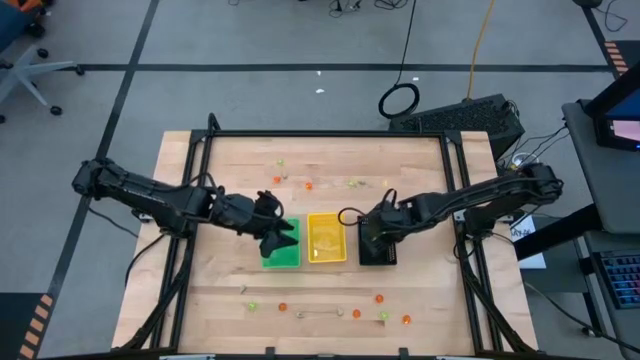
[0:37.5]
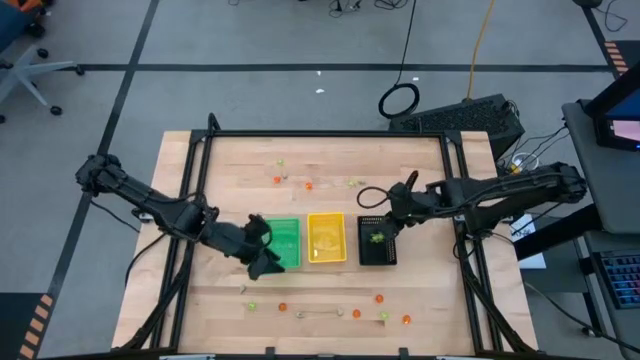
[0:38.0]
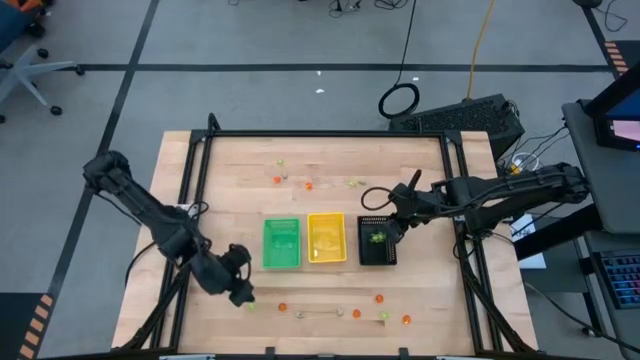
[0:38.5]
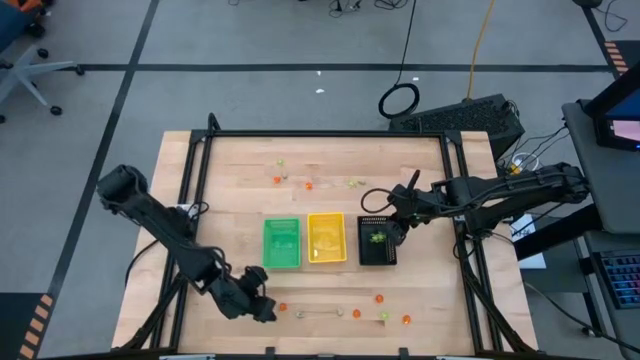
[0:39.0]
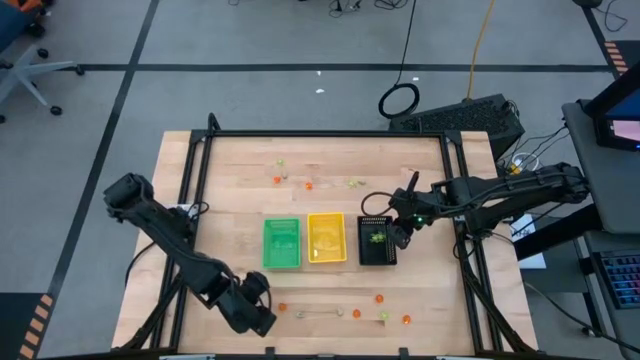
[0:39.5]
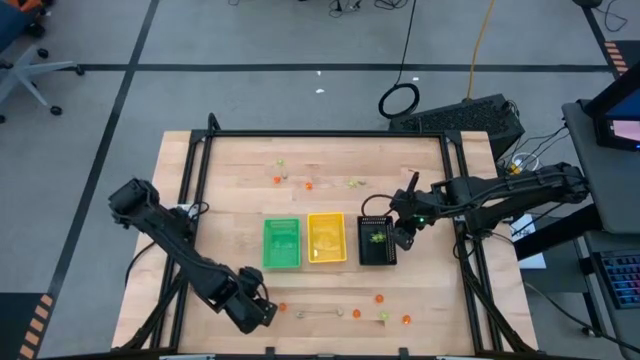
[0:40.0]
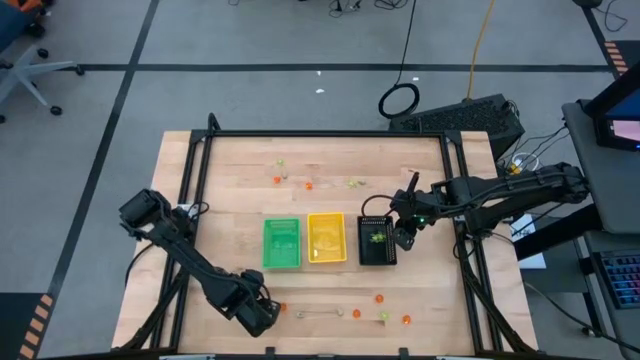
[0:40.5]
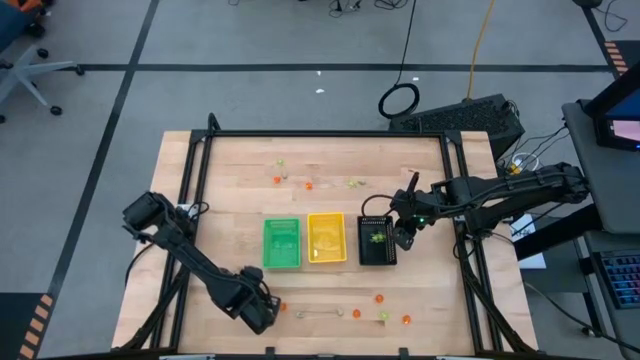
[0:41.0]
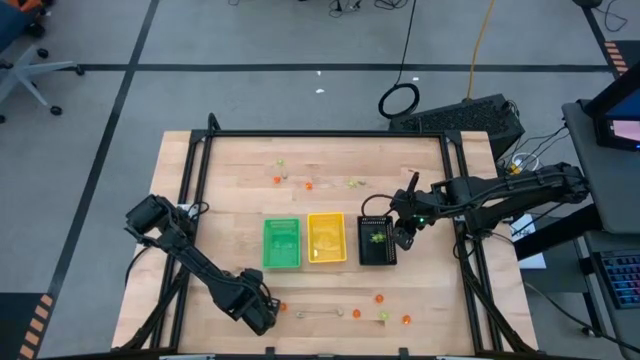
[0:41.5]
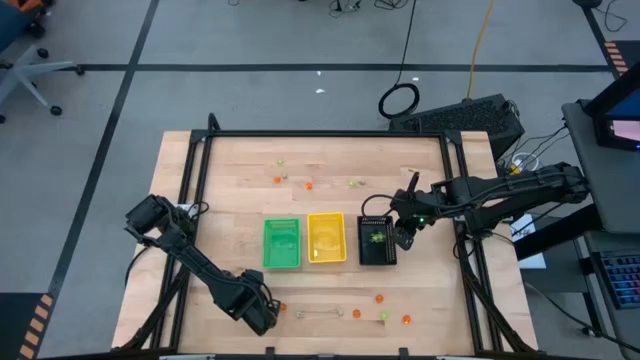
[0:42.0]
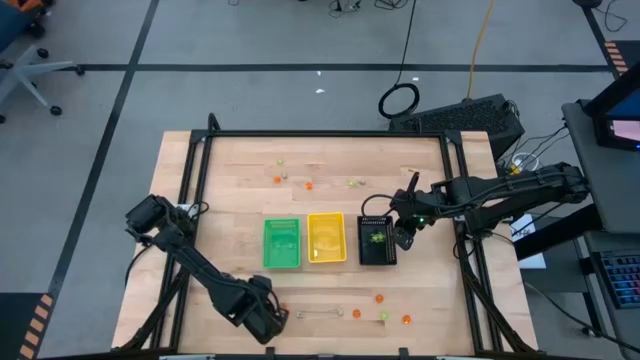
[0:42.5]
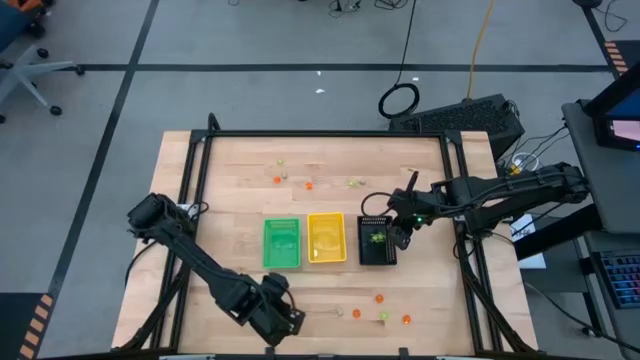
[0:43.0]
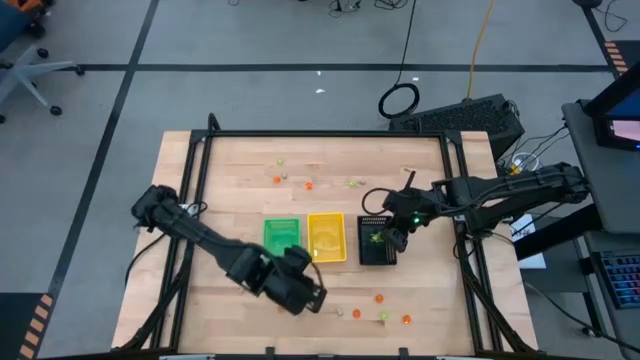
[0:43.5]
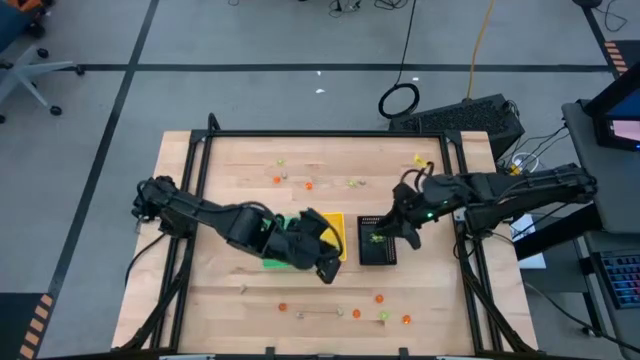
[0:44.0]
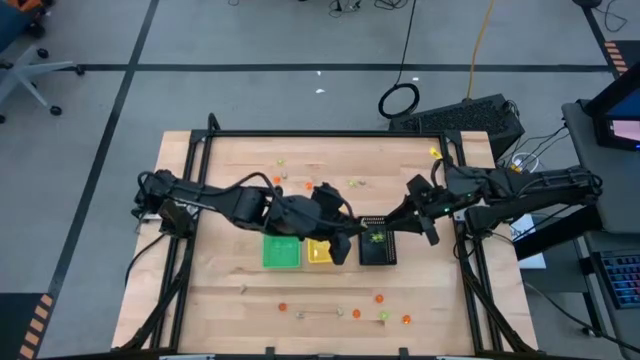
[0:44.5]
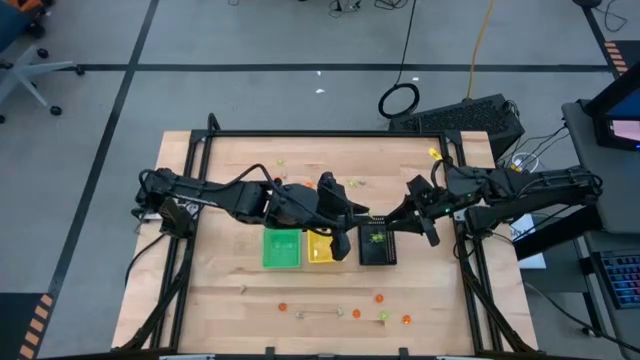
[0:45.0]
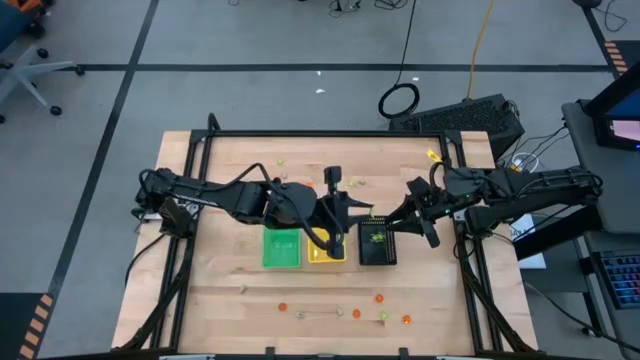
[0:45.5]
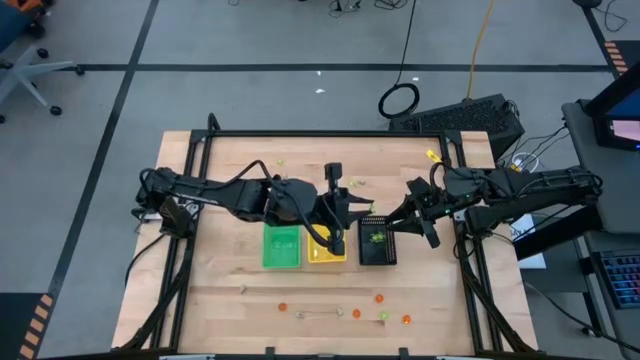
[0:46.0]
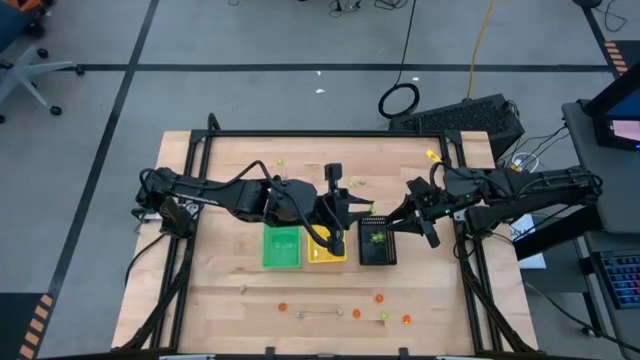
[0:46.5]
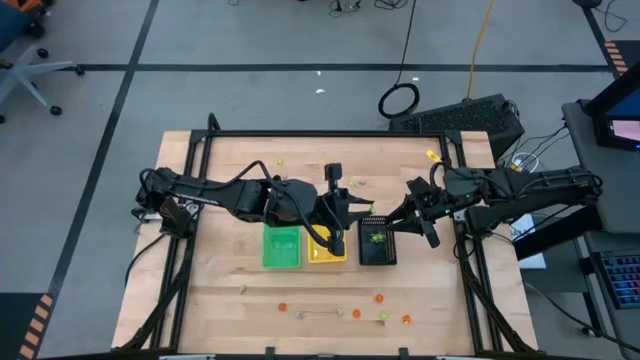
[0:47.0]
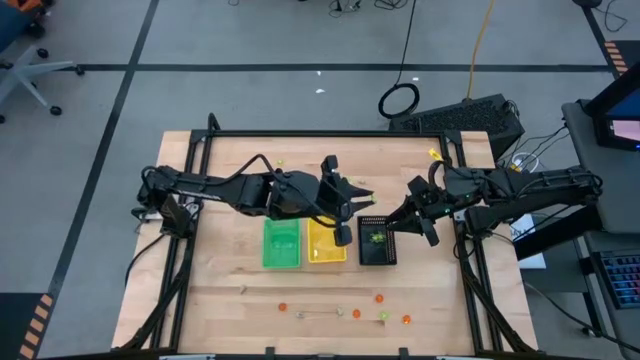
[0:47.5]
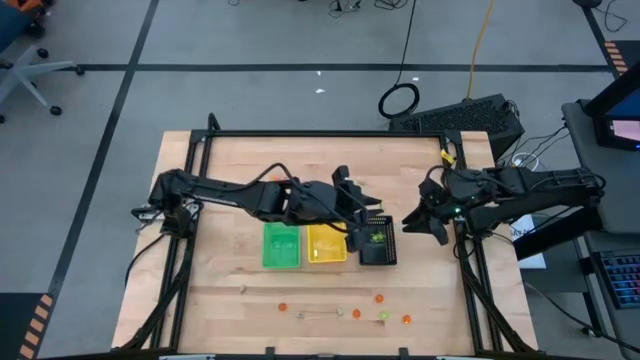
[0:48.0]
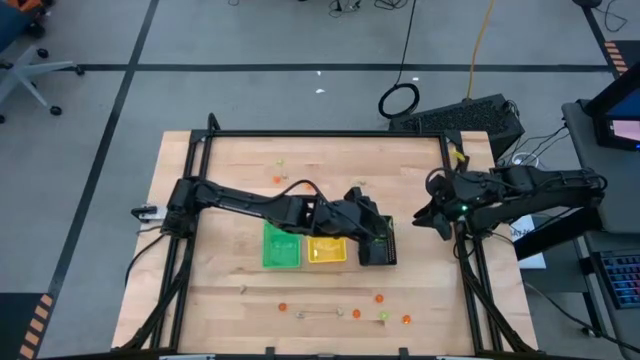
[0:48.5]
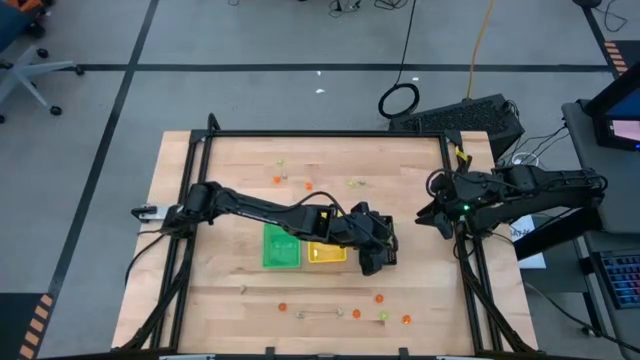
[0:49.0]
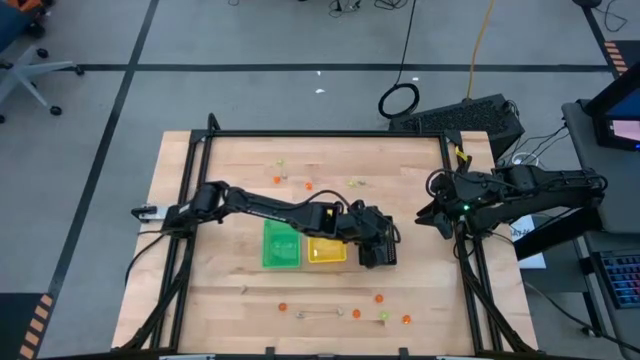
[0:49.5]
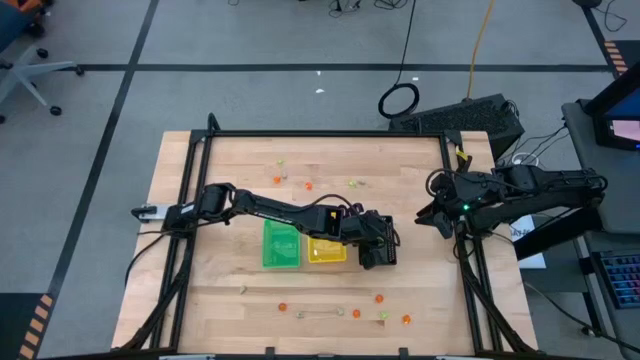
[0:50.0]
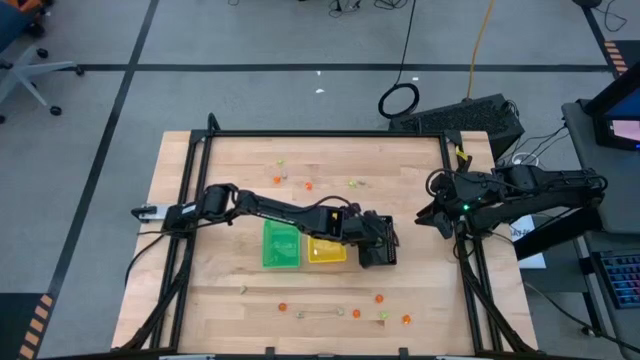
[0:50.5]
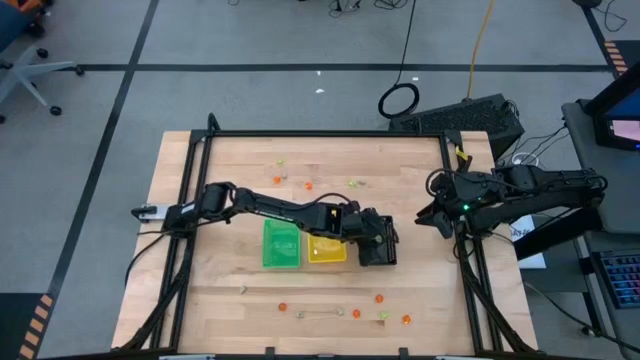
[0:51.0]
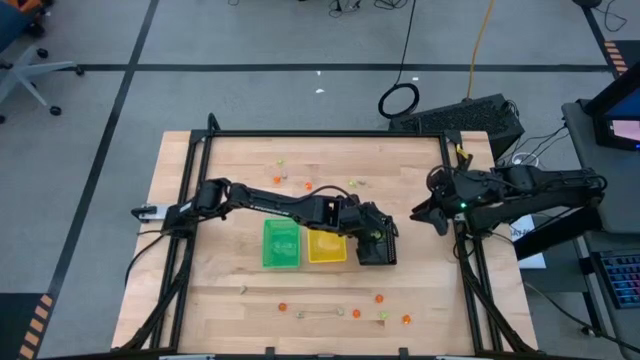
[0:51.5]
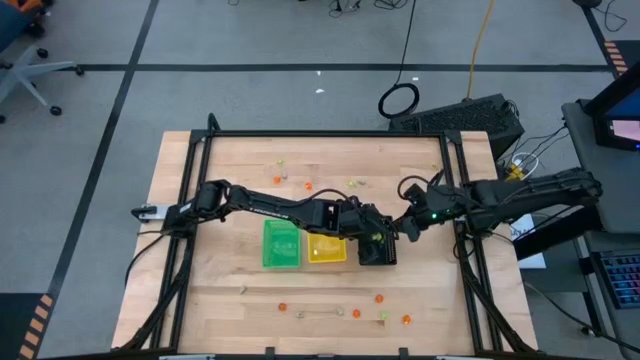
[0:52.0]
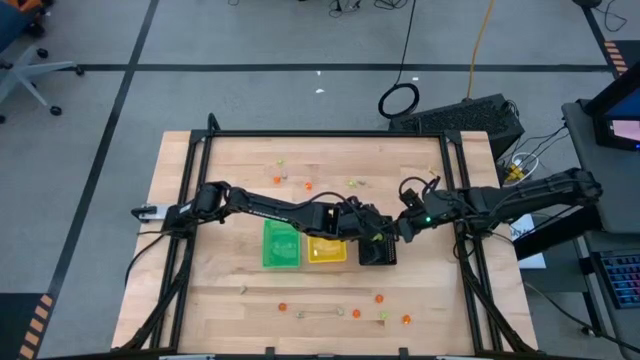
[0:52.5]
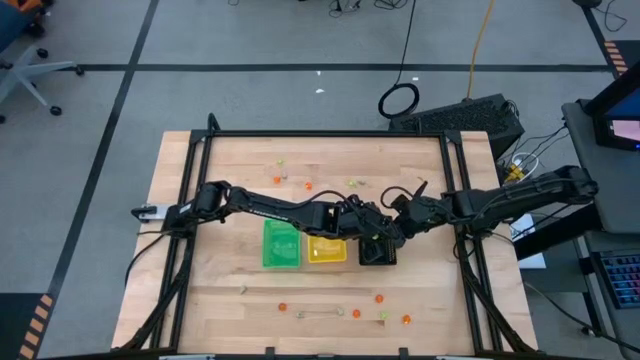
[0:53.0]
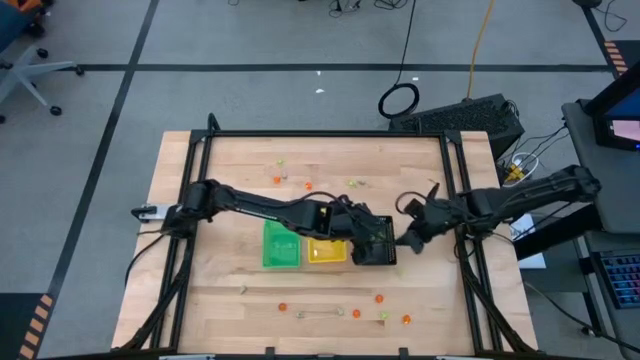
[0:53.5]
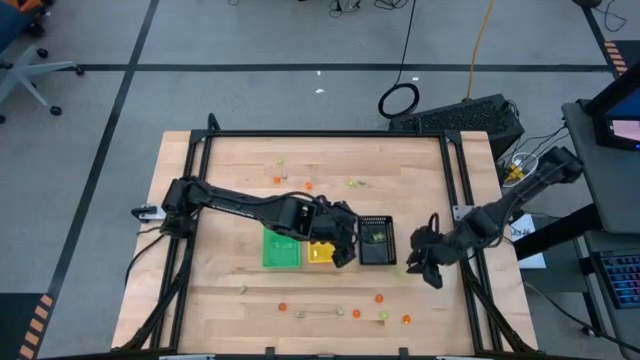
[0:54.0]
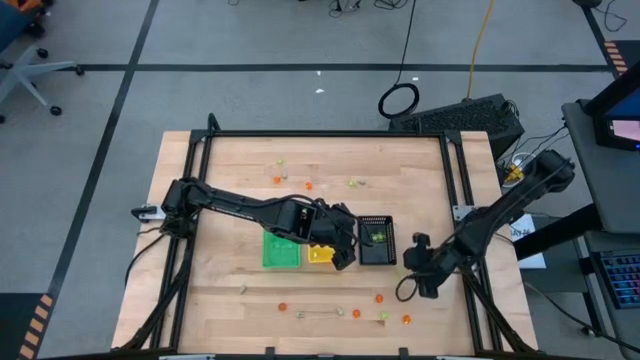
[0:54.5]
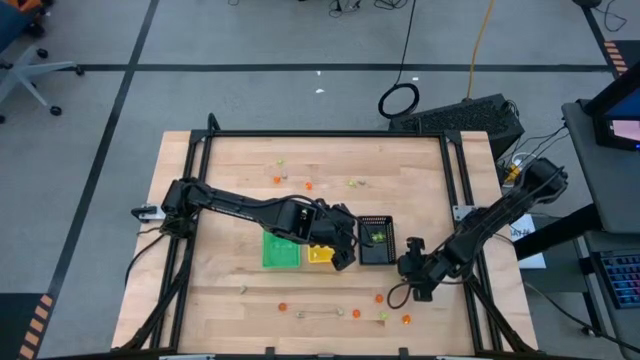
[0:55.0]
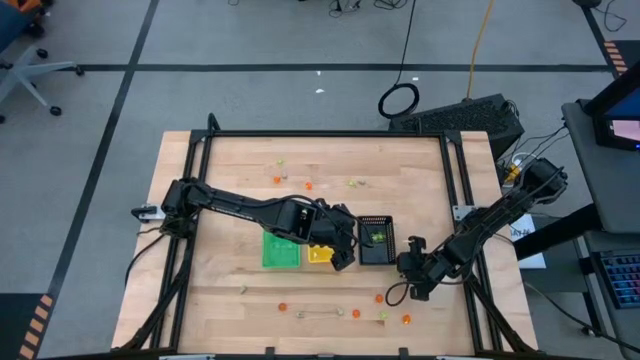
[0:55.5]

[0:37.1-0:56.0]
Task: Sort Halloween decoration
Put the green spider toy into the black basket
